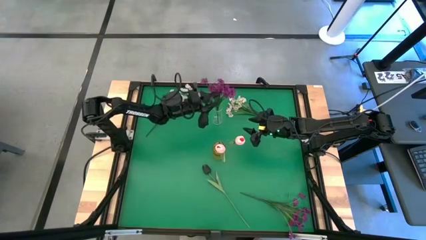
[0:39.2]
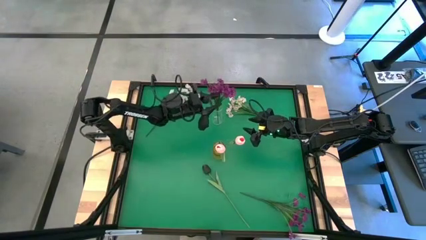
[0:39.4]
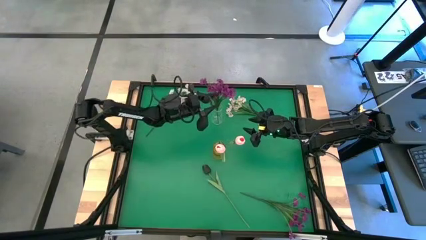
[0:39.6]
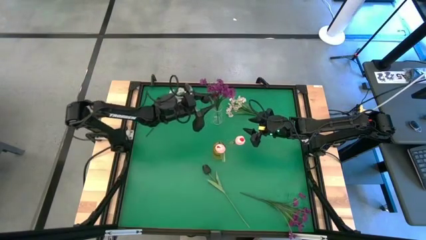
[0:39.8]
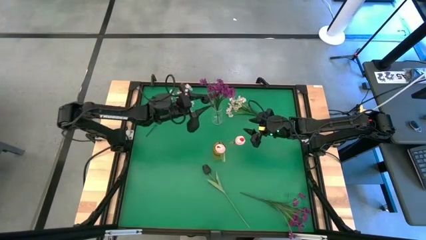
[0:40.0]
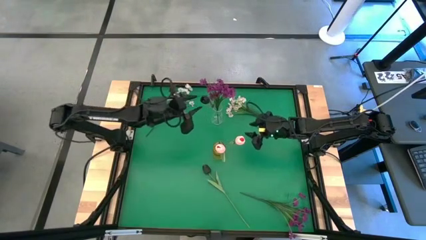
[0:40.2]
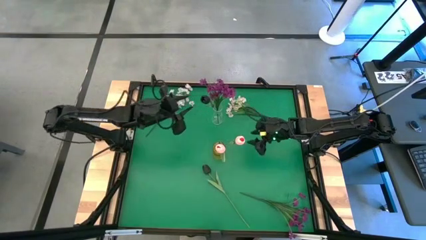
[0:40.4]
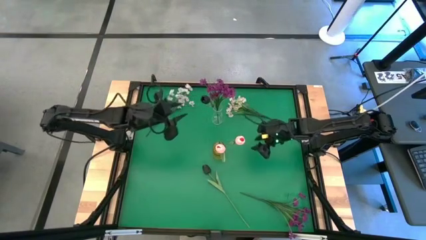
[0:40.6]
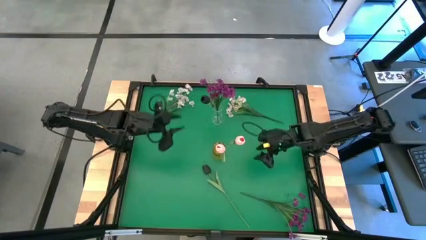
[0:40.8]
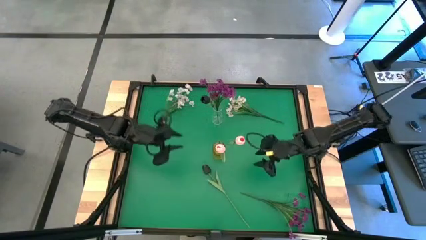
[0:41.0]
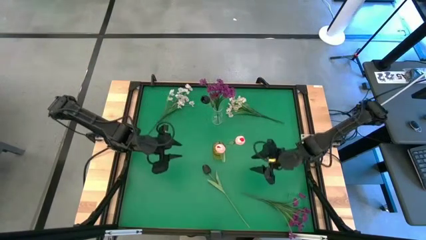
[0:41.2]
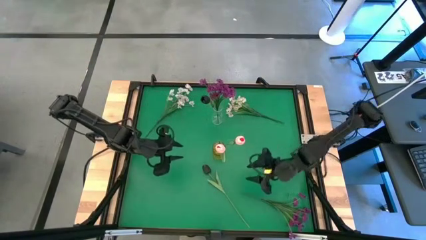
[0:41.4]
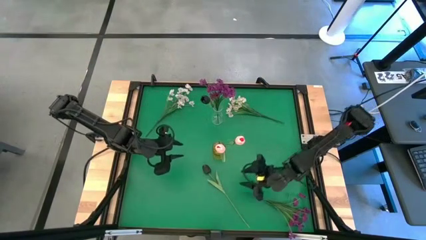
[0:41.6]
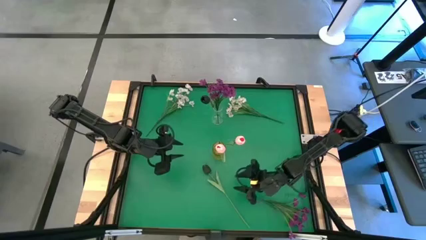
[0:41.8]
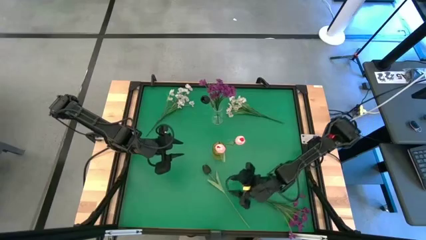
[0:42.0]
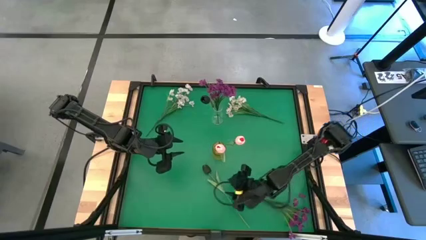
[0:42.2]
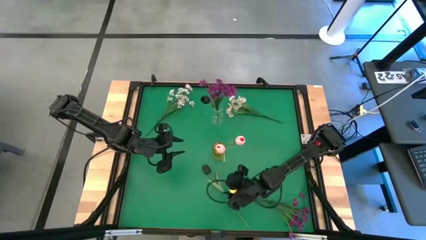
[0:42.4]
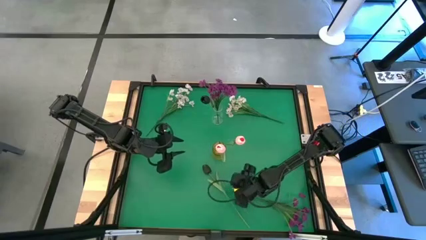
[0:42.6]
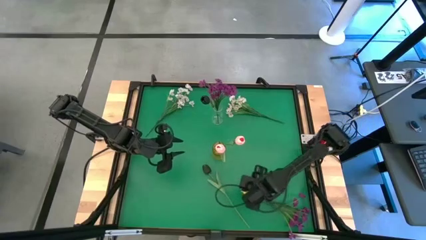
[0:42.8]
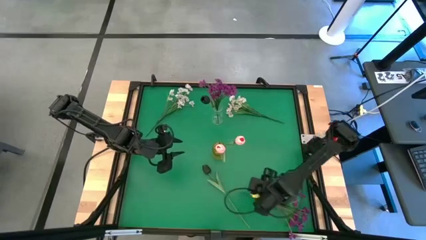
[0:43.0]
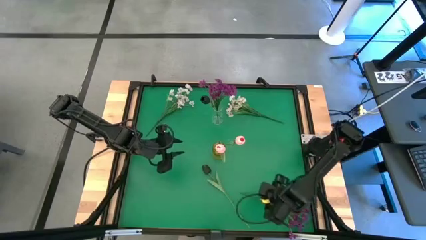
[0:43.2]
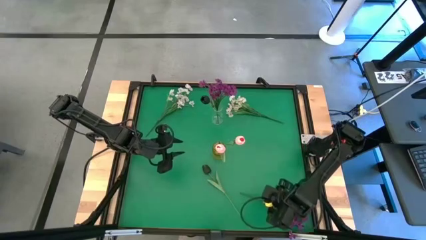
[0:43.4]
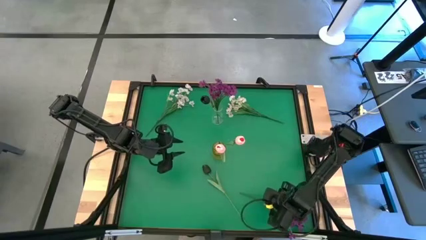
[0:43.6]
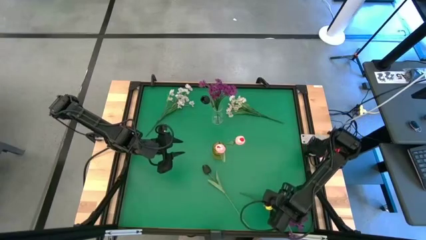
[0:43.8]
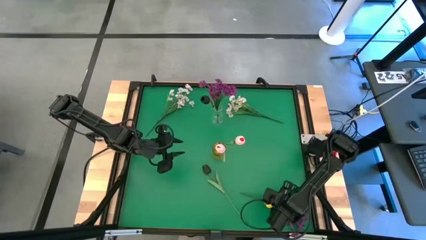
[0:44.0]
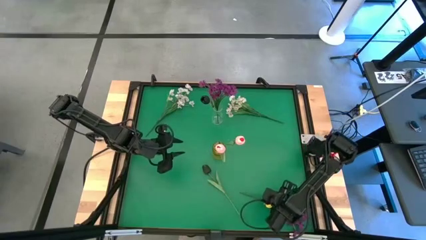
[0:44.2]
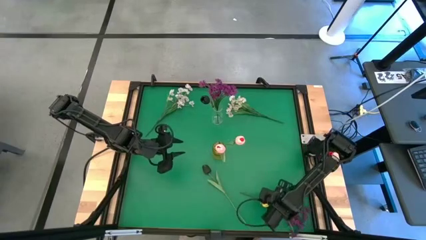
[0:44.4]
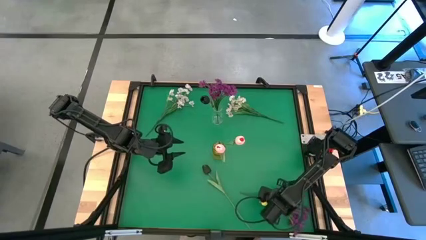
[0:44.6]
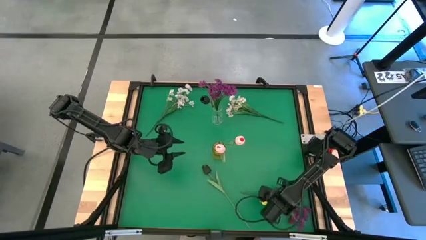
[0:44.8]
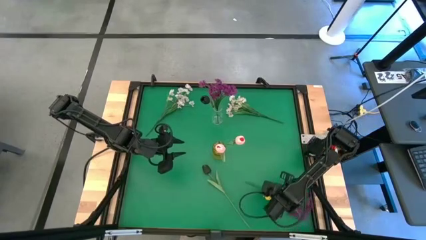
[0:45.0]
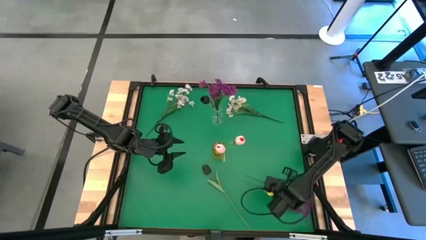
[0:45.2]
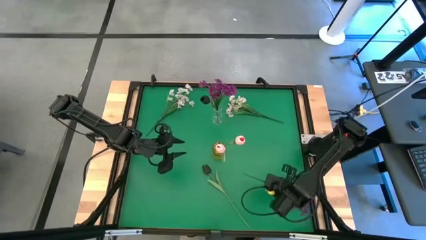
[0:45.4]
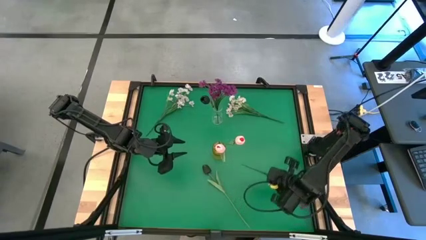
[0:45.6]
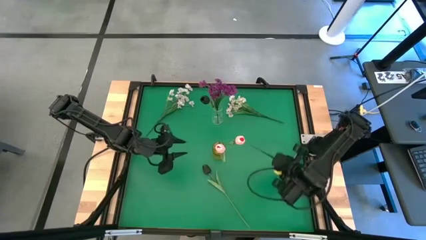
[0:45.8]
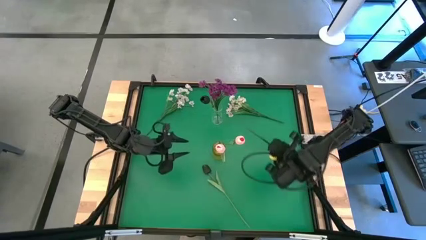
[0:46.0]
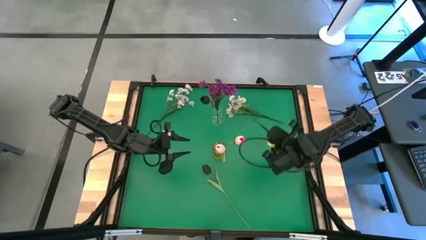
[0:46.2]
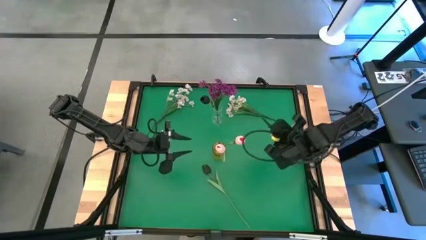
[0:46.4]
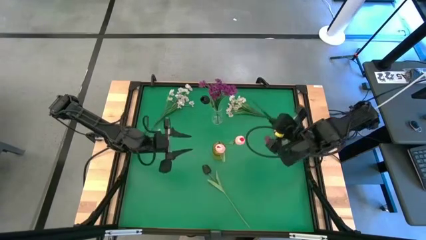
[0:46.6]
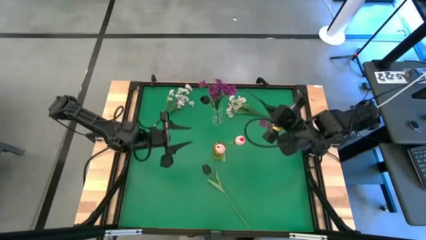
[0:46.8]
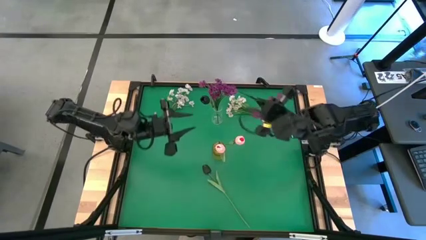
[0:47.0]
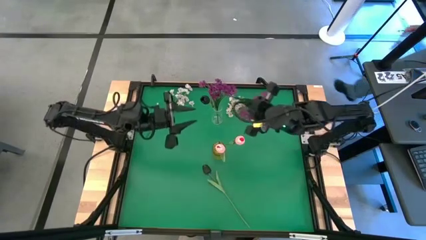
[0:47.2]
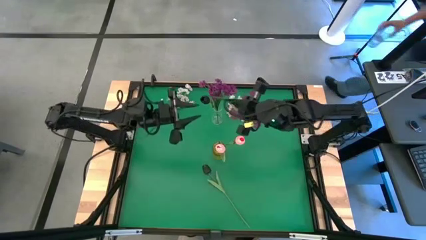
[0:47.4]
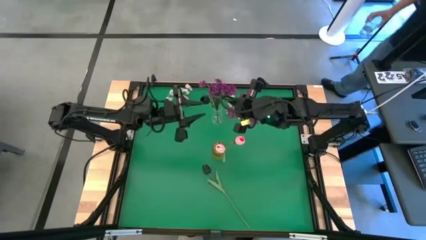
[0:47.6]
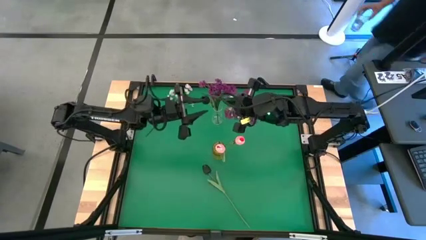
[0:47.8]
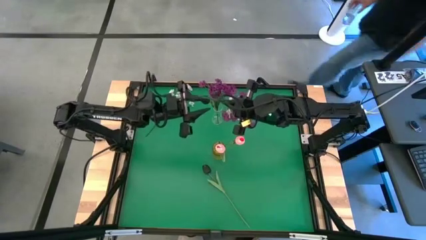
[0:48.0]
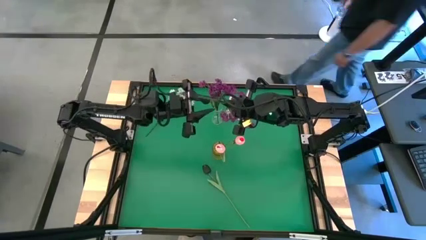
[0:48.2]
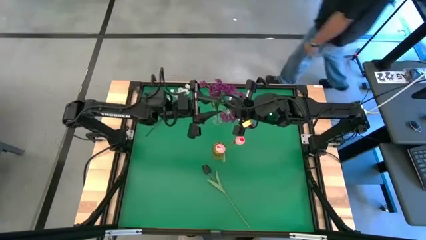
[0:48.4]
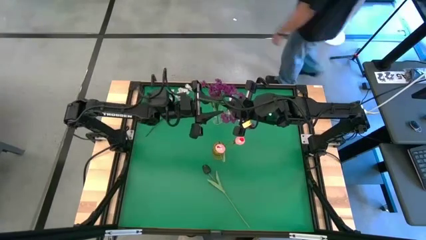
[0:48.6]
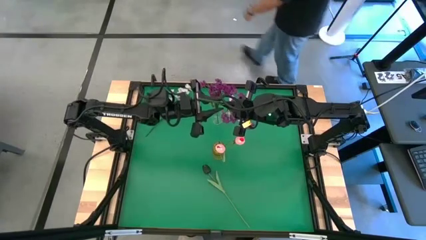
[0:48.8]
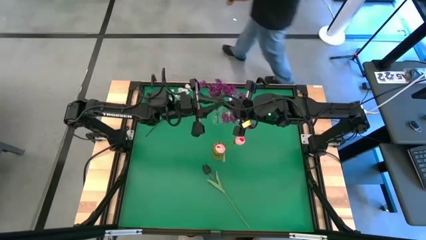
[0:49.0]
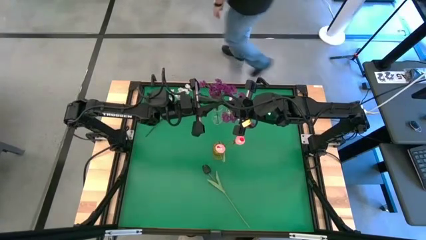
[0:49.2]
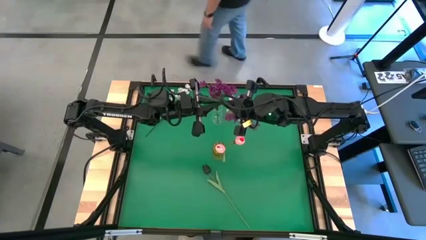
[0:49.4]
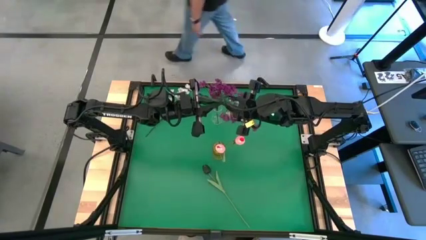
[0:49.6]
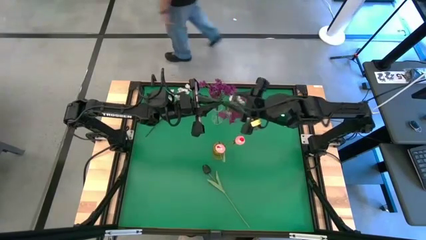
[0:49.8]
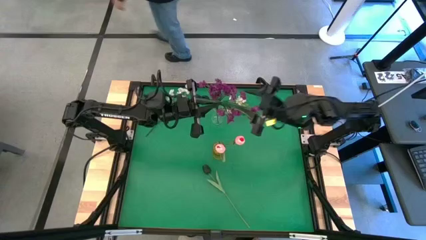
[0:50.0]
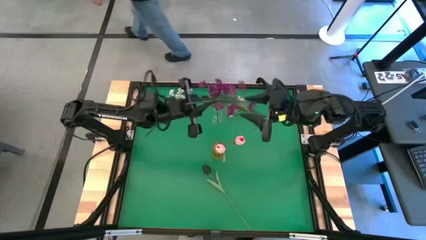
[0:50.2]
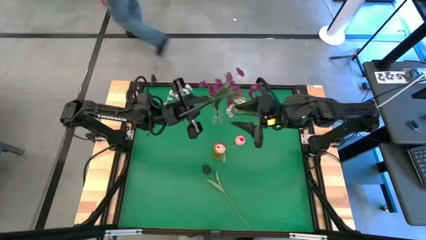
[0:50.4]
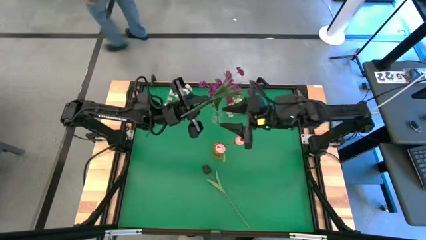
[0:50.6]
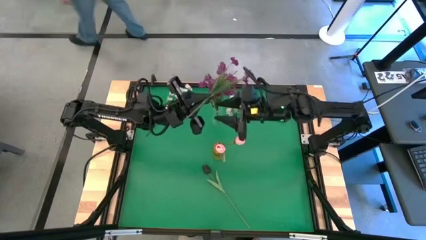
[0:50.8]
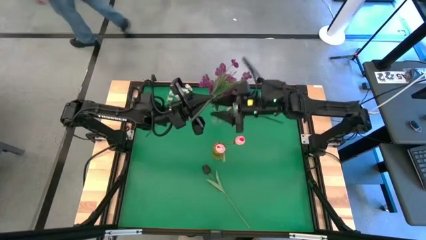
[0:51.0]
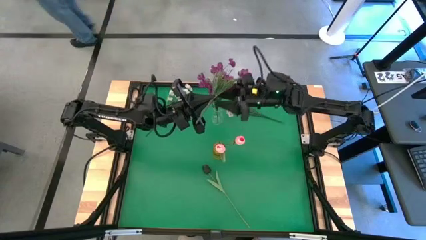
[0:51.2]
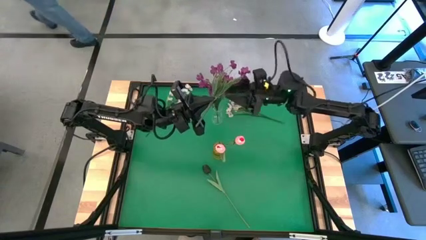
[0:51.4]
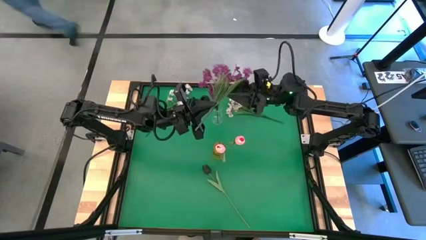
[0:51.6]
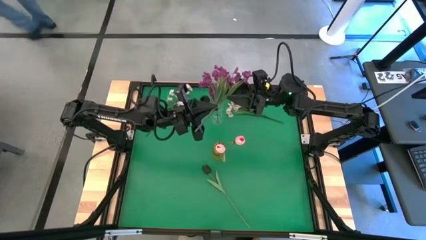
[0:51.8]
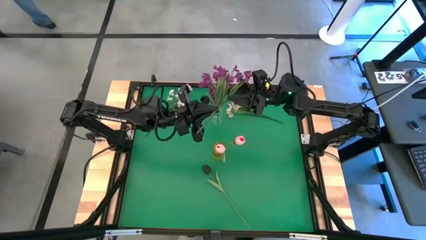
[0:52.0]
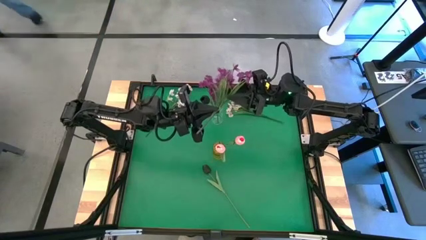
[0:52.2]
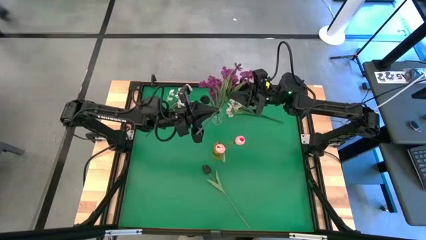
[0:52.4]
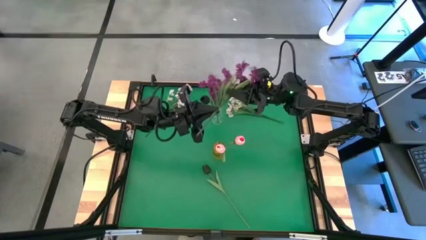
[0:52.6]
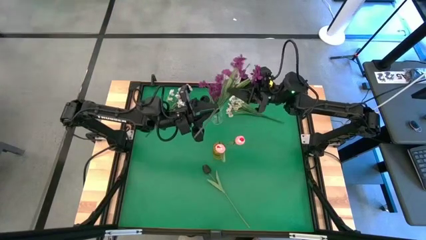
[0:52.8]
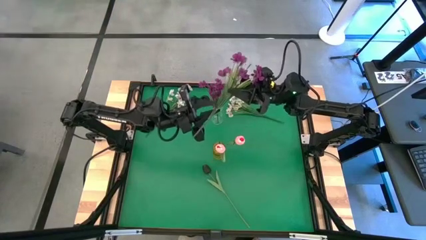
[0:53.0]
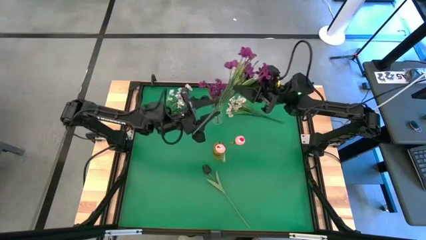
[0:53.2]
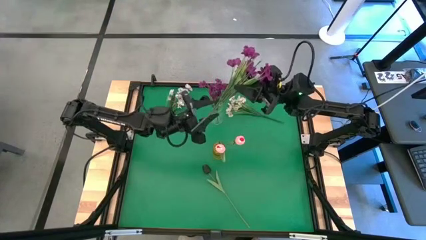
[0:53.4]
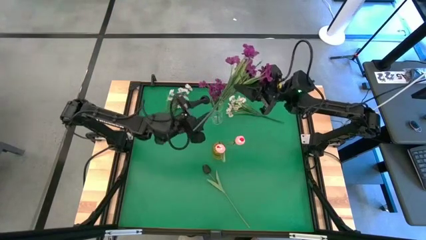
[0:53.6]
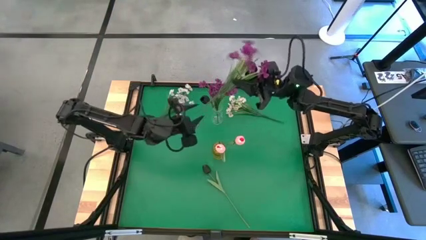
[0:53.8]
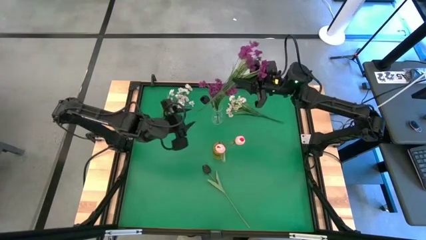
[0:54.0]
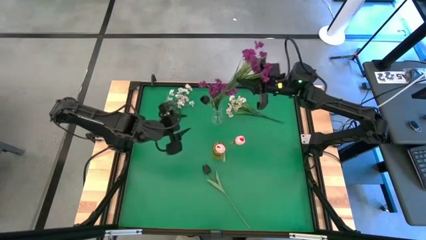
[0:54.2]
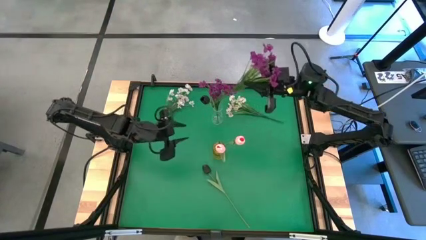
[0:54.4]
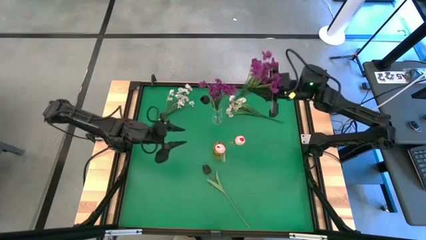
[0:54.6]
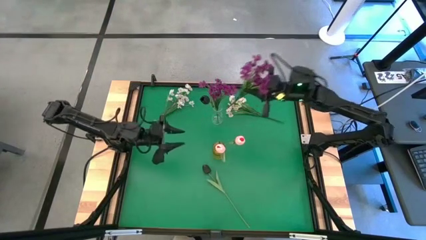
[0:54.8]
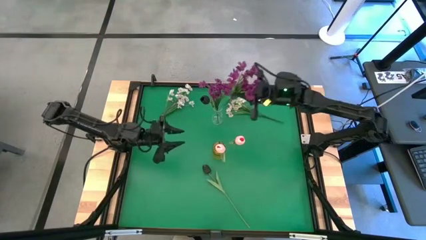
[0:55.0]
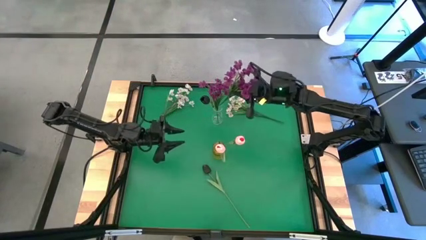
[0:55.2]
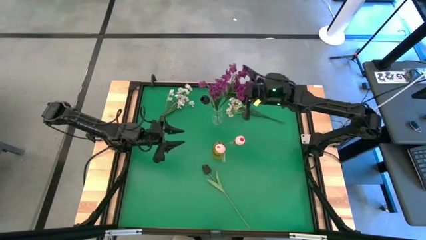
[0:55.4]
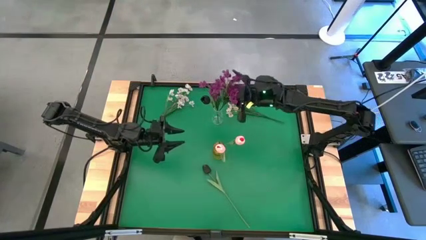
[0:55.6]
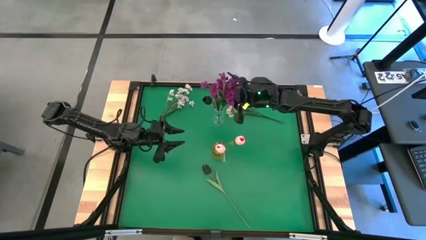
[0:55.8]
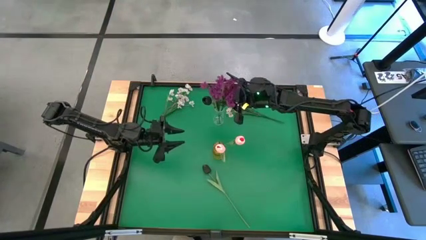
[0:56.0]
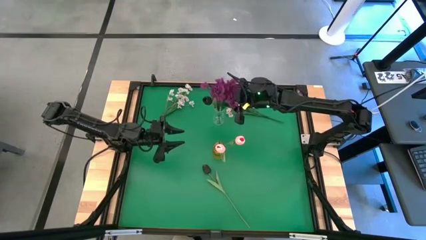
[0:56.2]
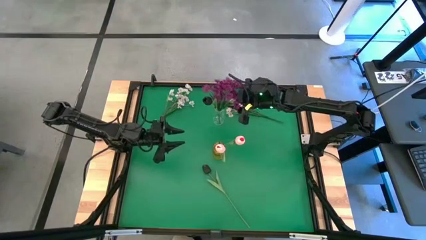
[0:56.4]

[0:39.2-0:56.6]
Task: Sort flowers into vase by color
Put the violet flowers into the transparent vase
